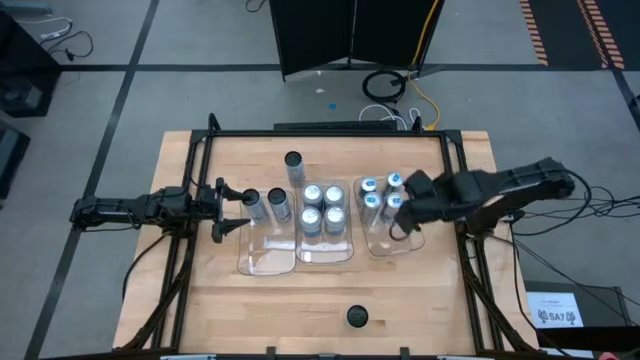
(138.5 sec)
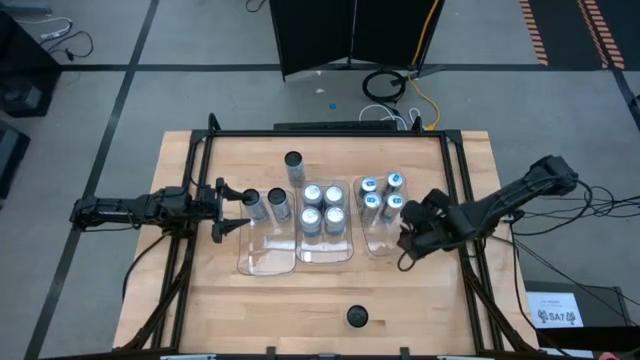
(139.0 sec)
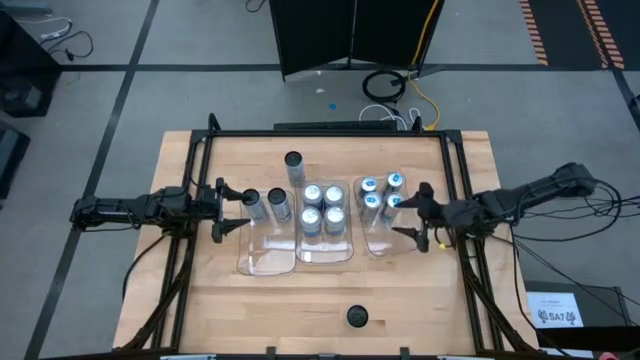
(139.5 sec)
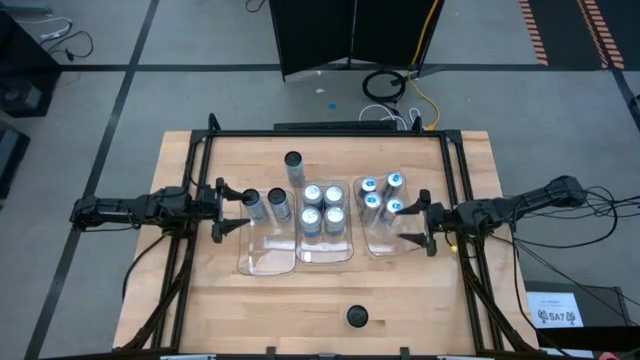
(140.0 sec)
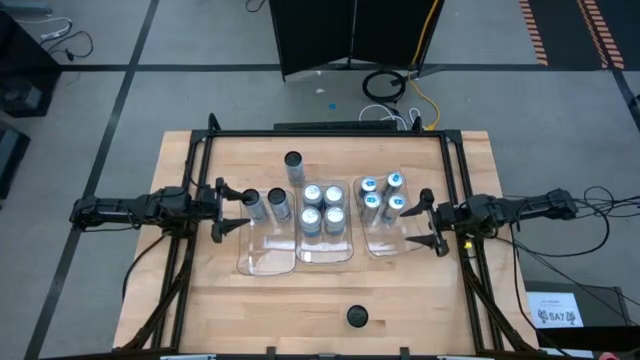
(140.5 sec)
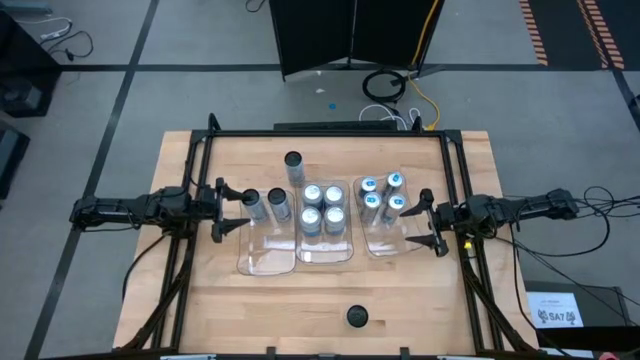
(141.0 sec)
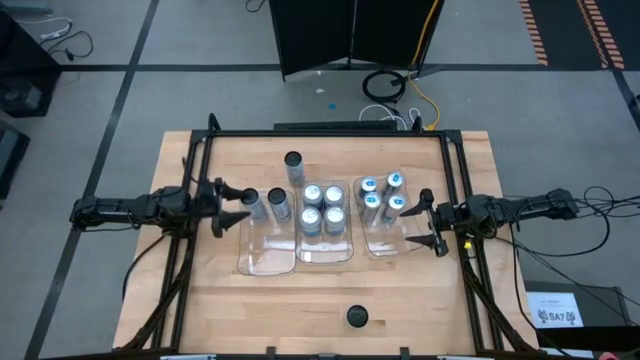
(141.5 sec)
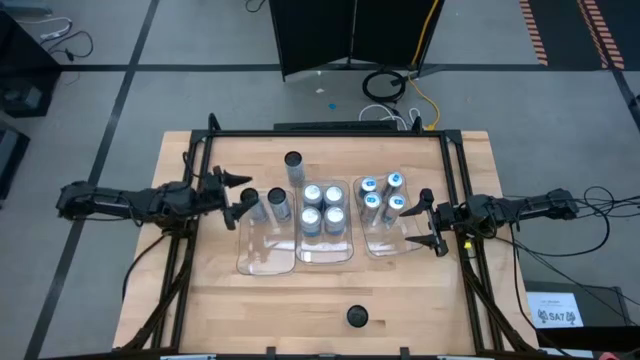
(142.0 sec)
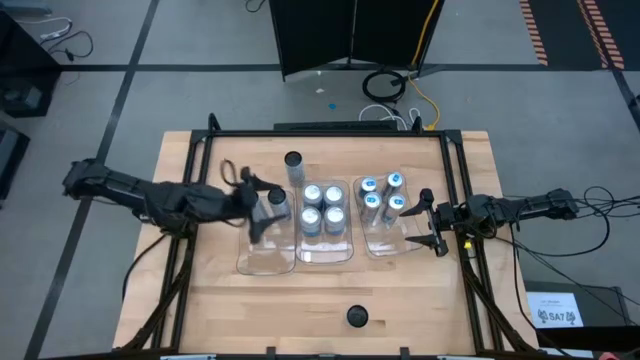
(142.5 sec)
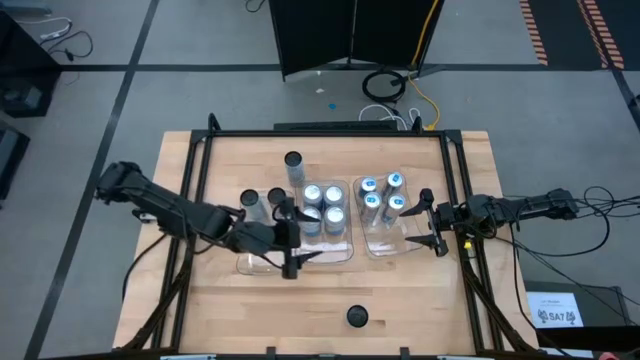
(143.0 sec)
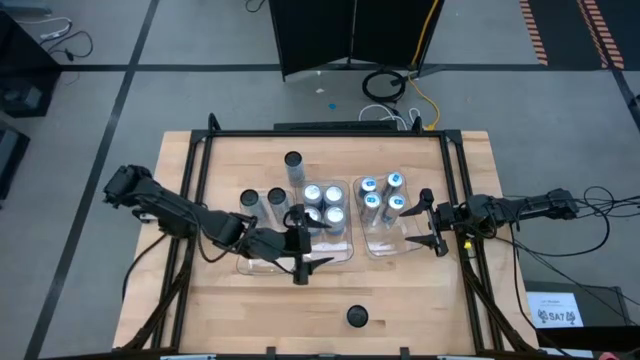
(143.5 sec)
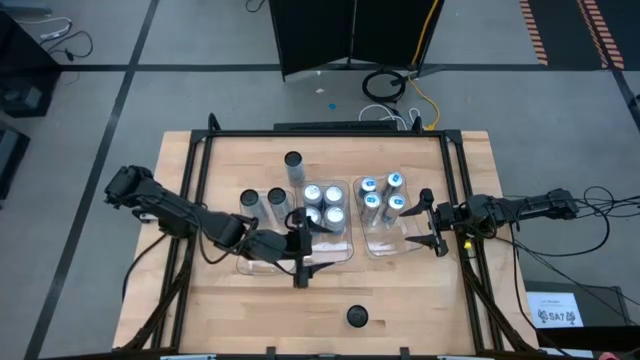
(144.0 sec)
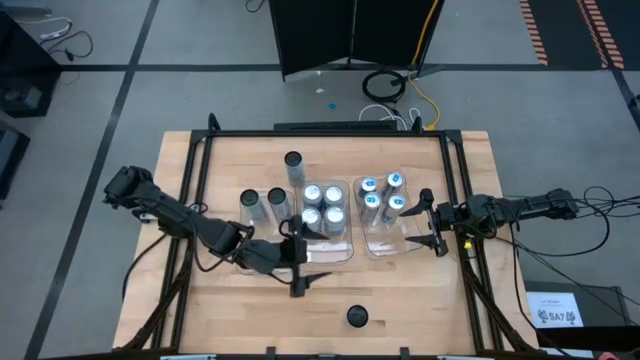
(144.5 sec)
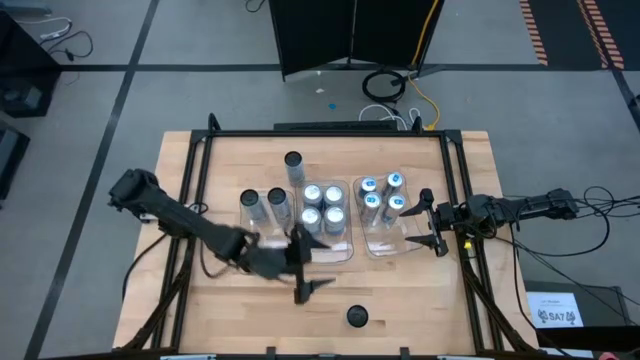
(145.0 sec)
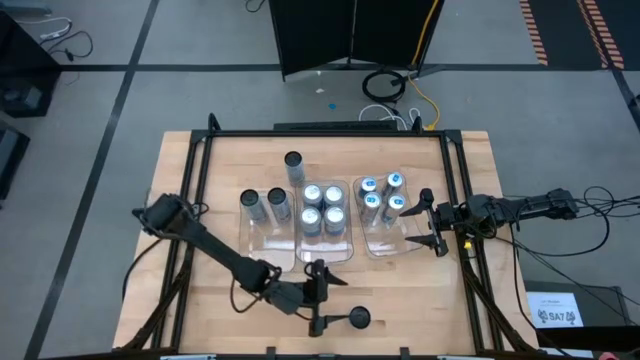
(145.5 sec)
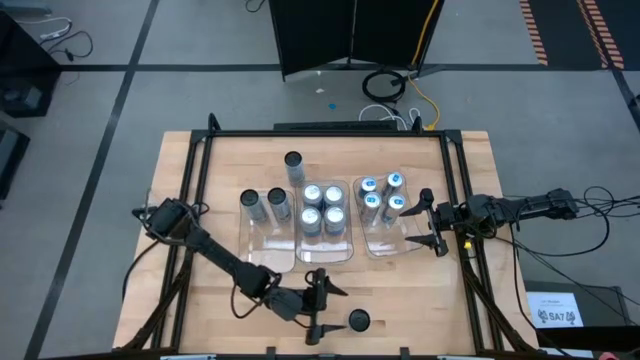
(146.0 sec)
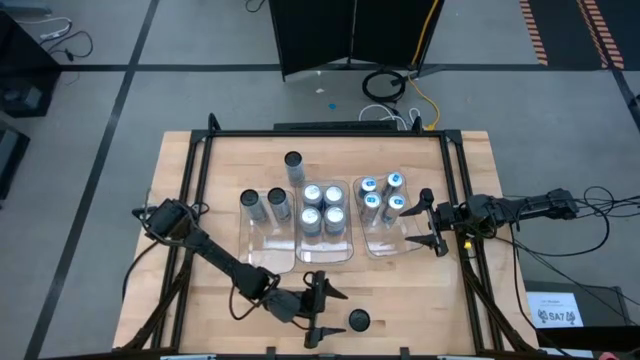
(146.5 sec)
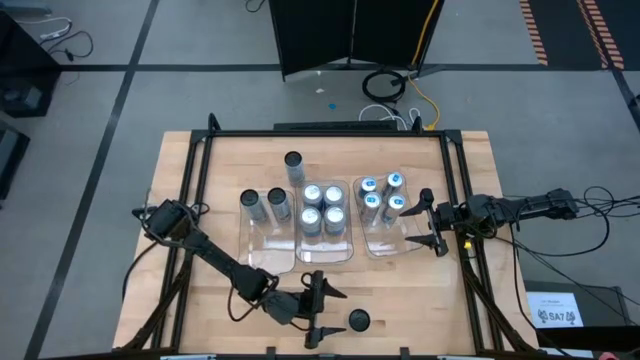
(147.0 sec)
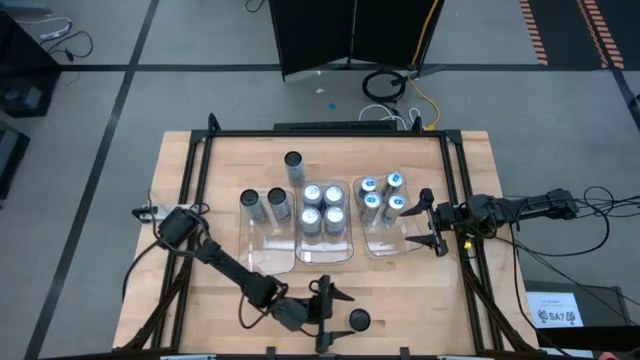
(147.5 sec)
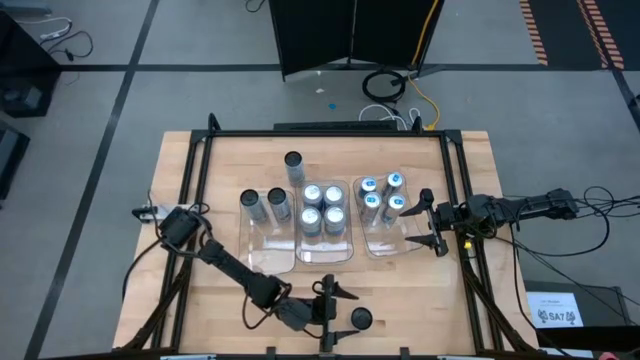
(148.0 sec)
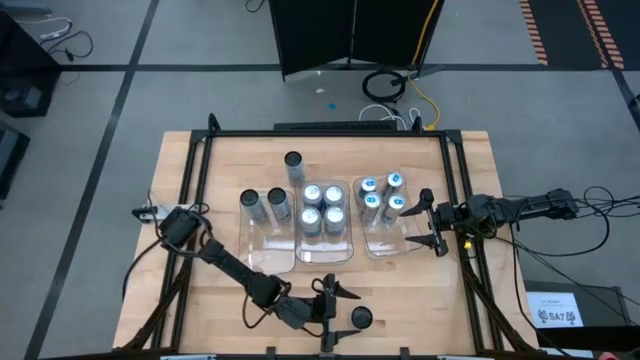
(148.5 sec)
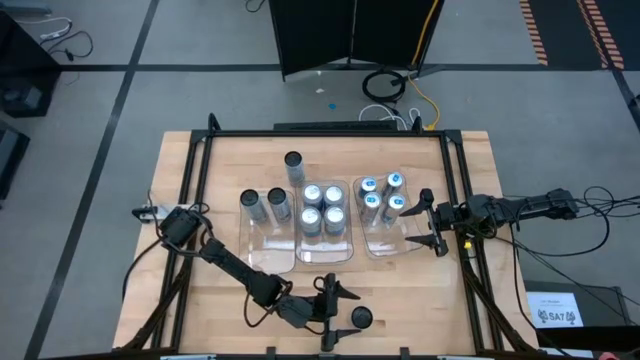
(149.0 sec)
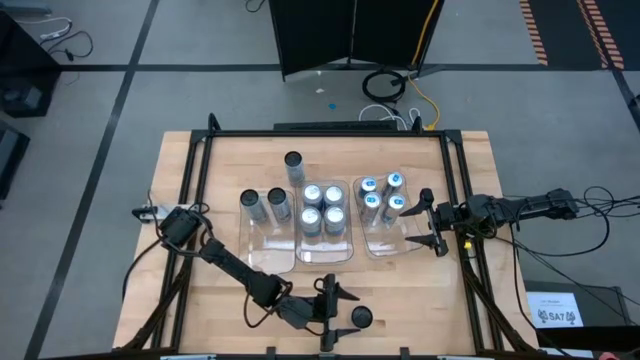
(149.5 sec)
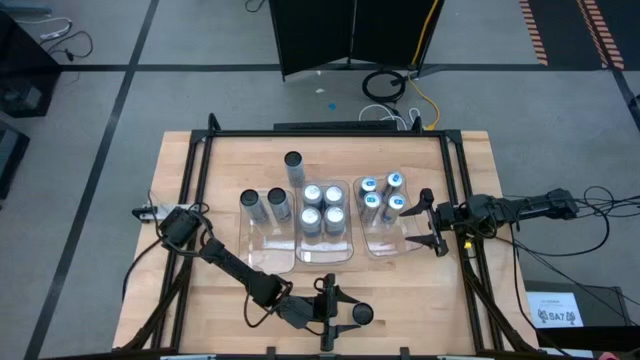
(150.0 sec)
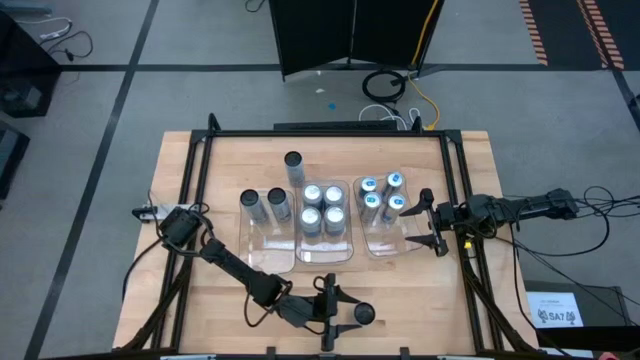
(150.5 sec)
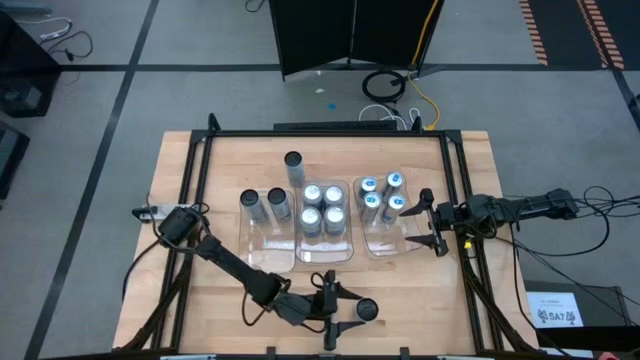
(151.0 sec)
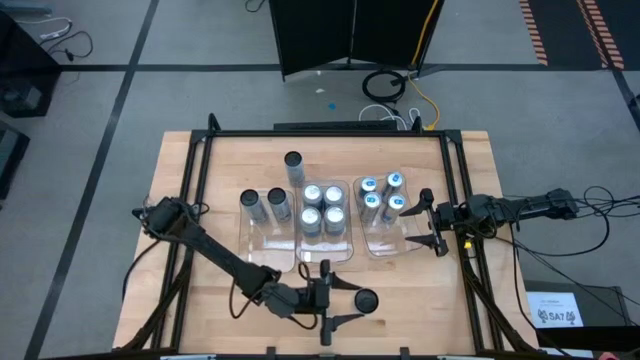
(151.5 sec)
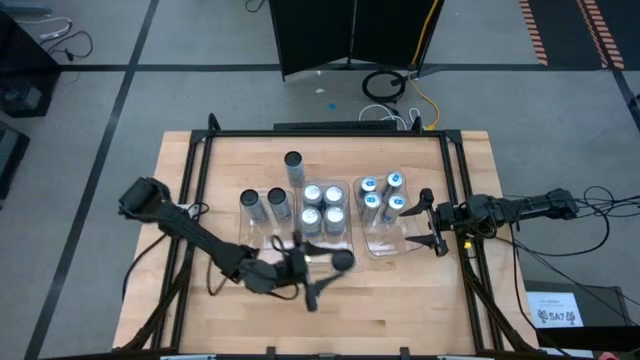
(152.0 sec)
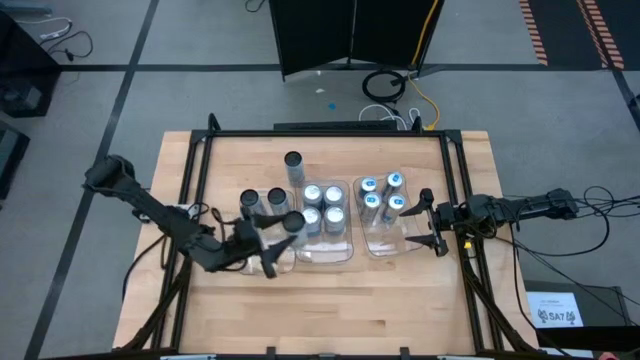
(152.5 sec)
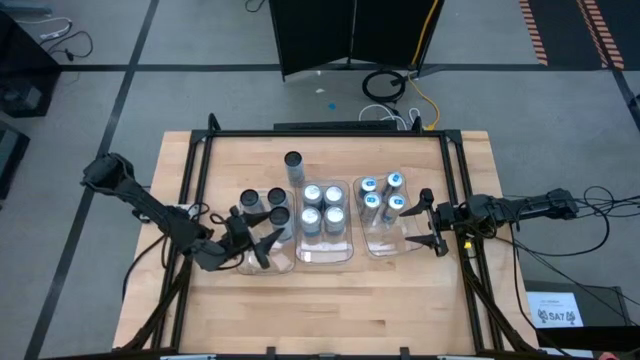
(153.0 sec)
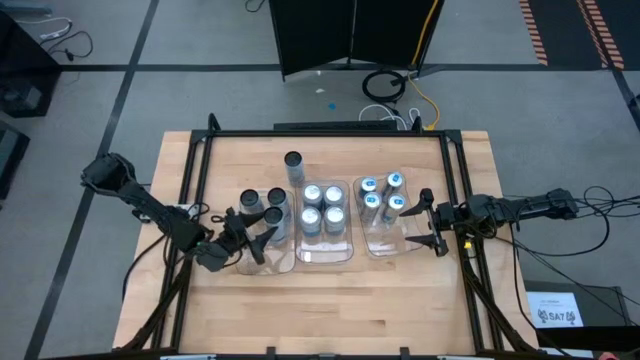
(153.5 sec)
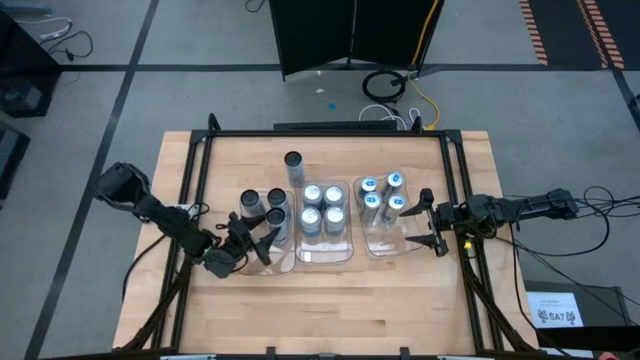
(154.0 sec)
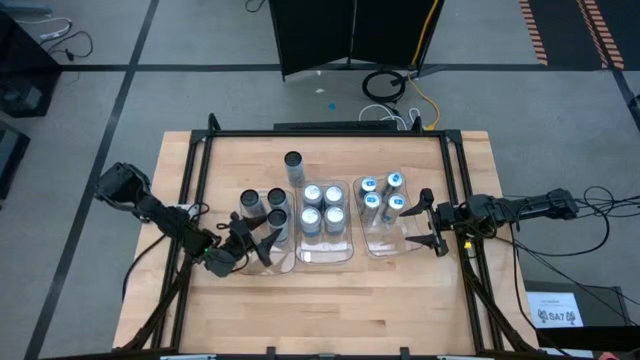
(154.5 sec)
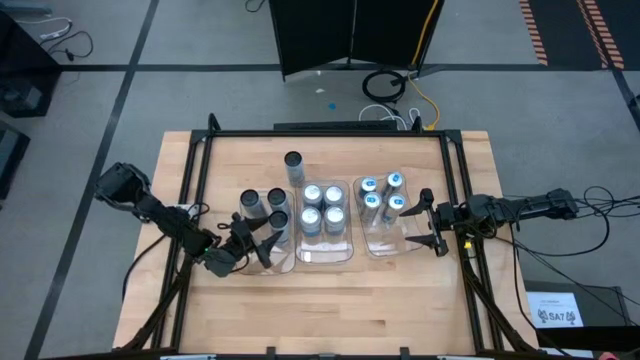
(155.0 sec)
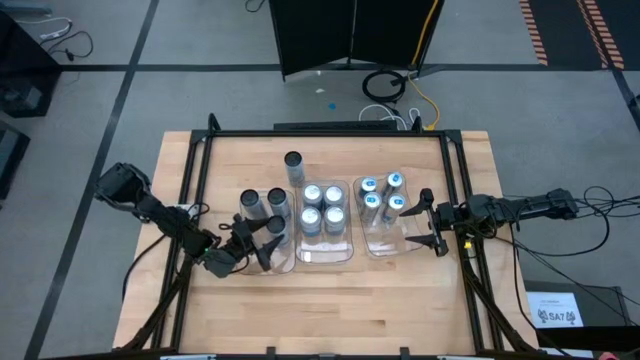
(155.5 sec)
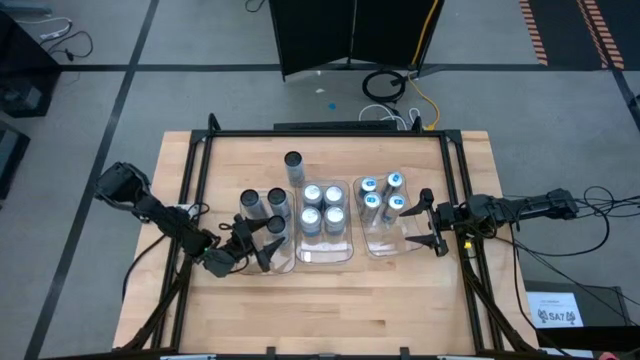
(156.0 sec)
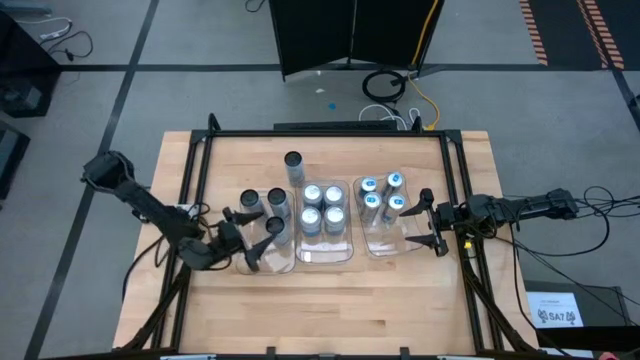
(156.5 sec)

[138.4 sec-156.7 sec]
Task: Sort soda cans
Put the bottom white soda can into the left transparent bin

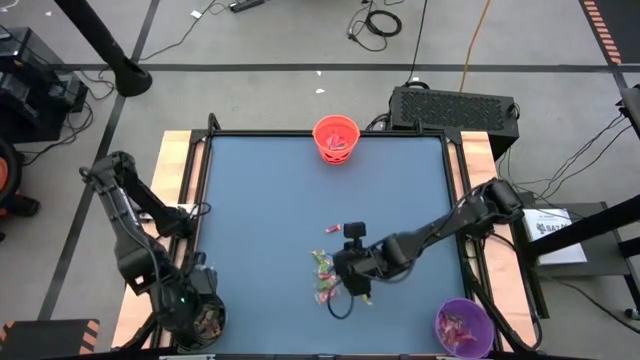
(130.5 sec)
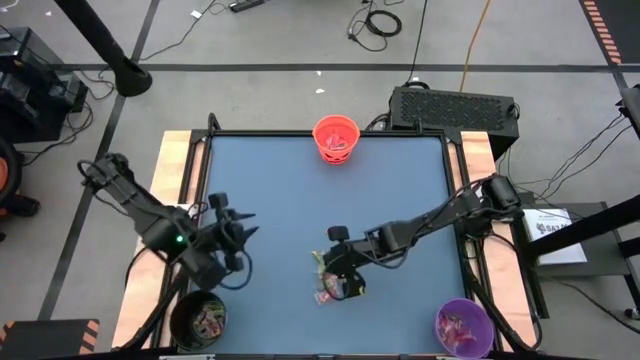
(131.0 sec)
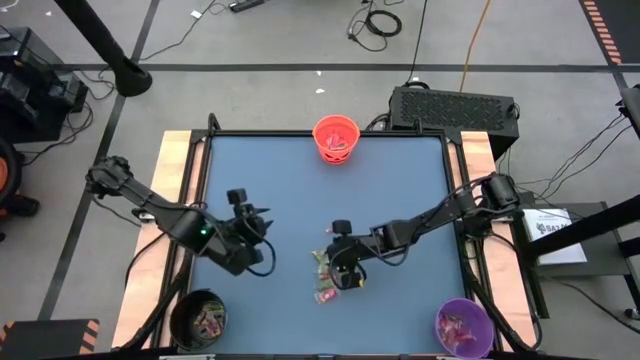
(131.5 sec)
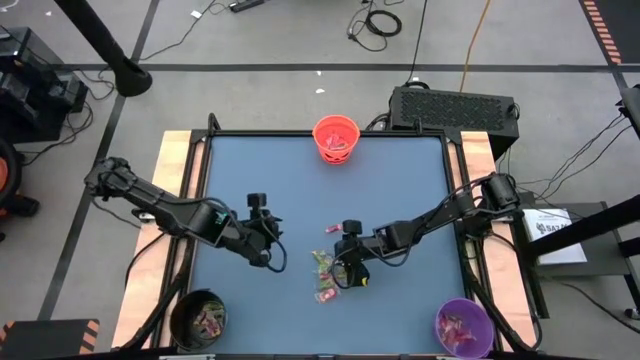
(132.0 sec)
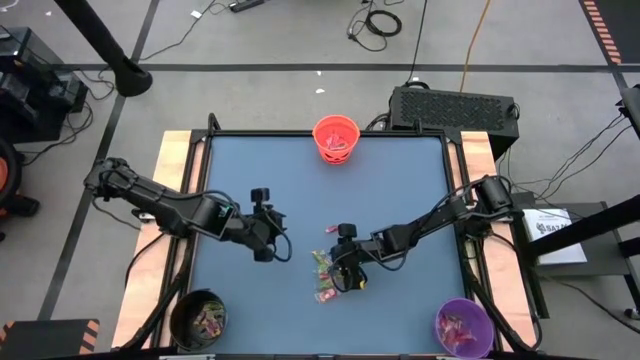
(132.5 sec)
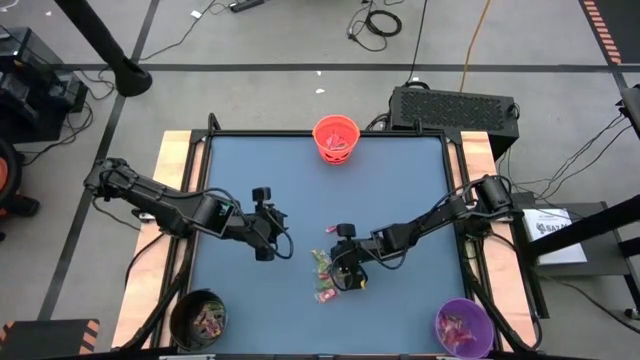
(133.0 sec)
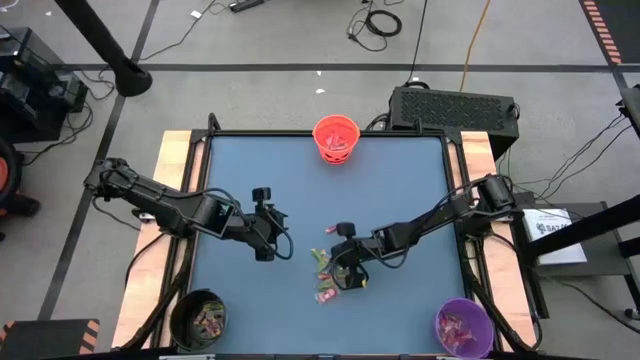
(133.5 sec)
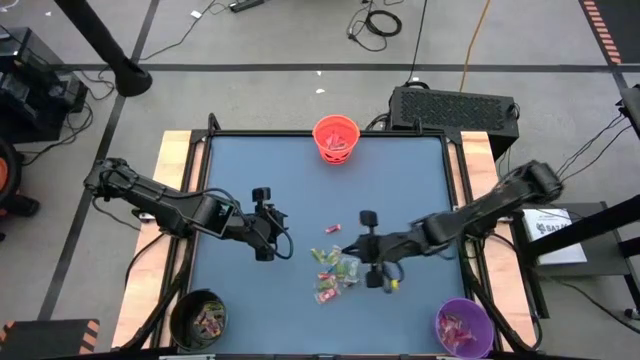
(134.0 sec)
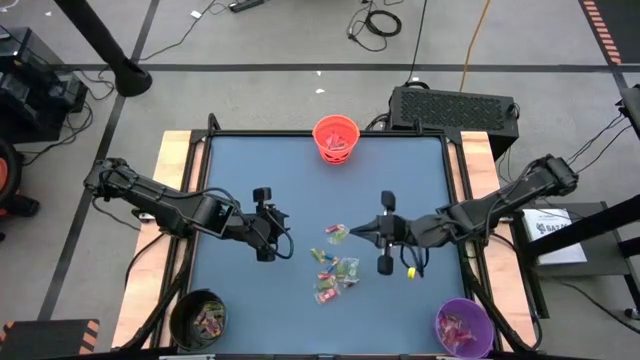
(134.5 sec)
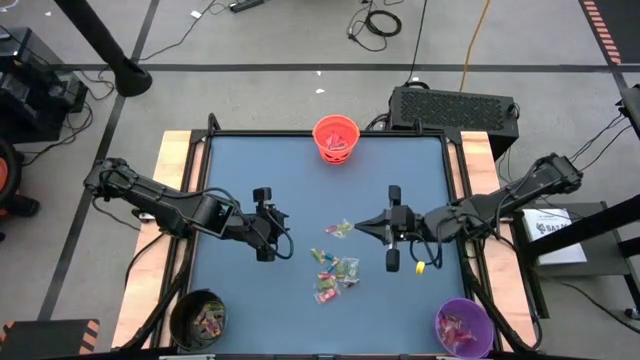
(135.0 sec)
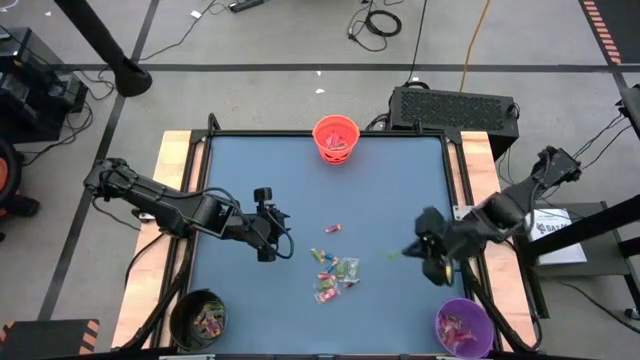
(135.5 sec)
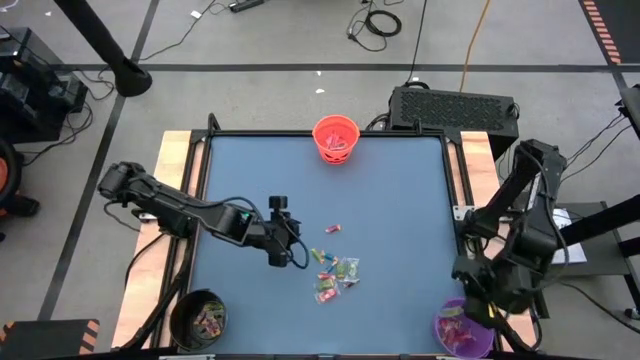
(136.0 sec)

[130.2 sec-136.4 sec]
Task: Sort candy by brand, put in halloween buckets
Put the small green gummy into the purple bucket
